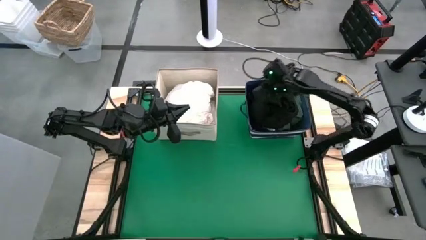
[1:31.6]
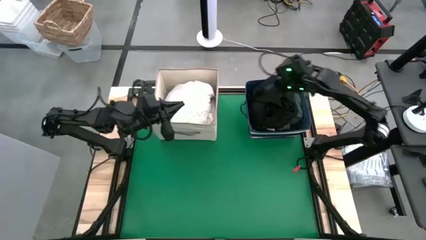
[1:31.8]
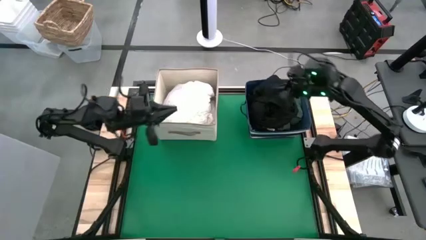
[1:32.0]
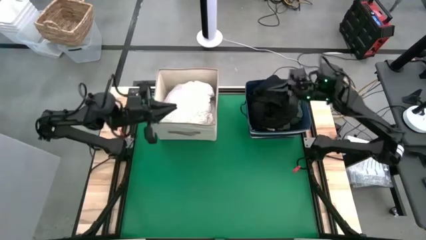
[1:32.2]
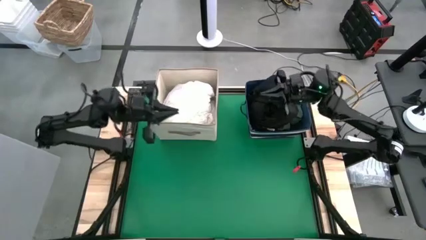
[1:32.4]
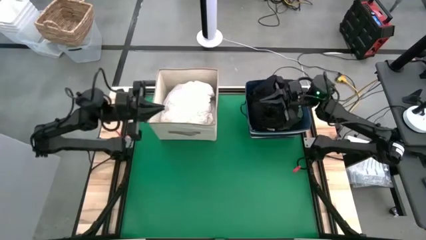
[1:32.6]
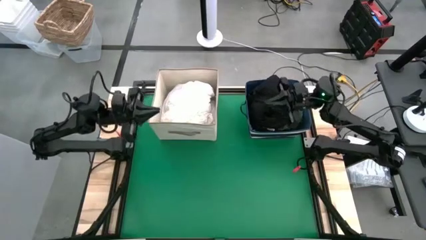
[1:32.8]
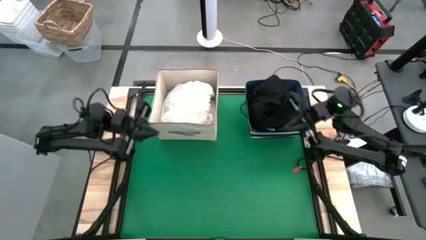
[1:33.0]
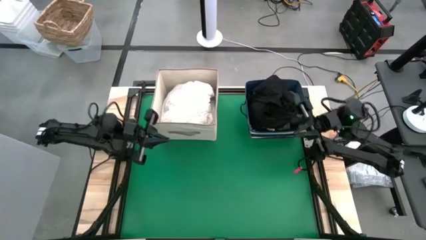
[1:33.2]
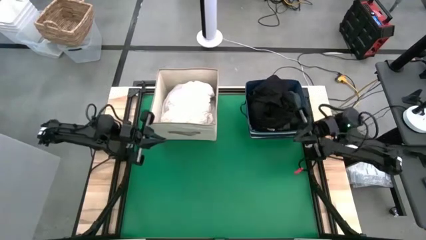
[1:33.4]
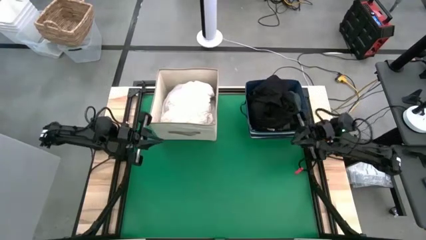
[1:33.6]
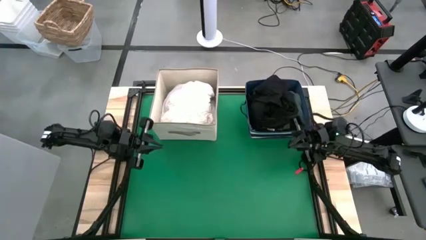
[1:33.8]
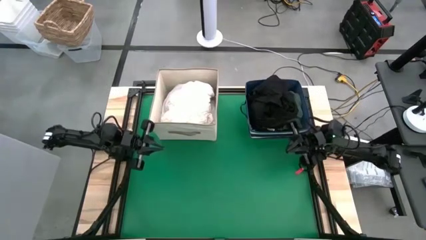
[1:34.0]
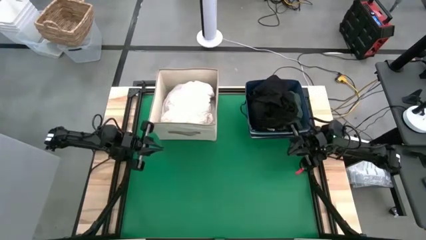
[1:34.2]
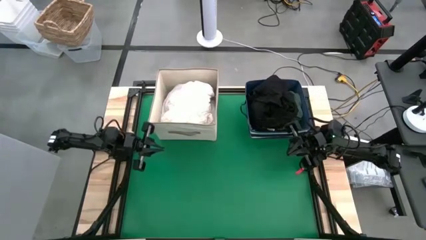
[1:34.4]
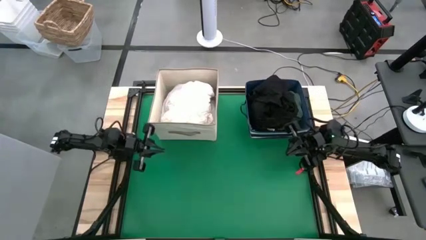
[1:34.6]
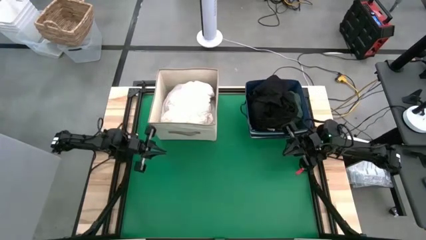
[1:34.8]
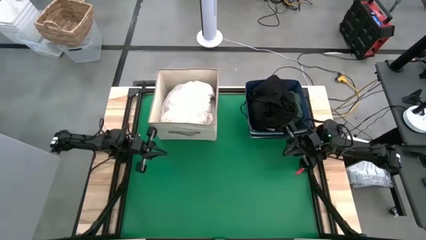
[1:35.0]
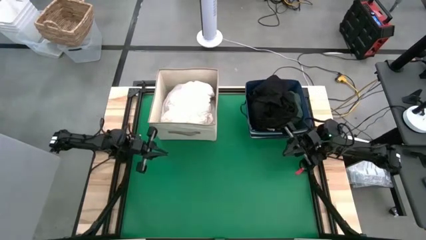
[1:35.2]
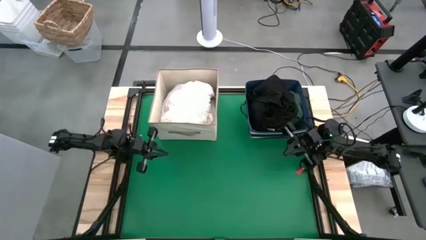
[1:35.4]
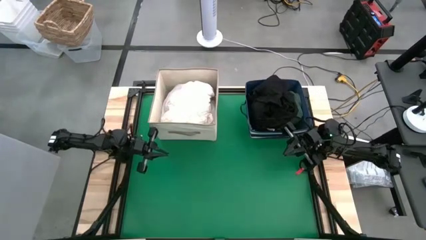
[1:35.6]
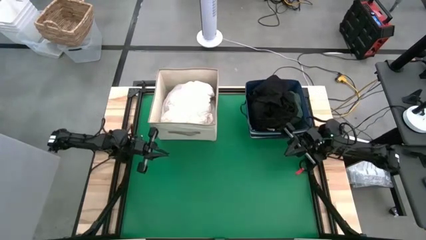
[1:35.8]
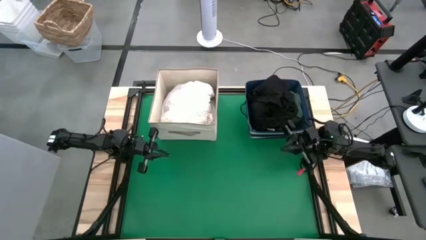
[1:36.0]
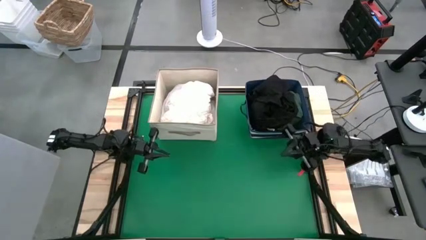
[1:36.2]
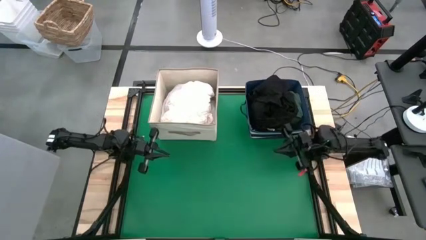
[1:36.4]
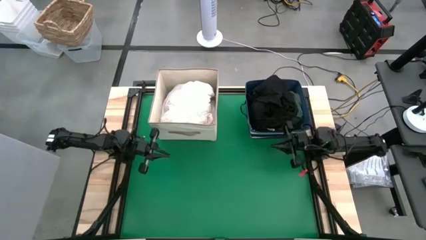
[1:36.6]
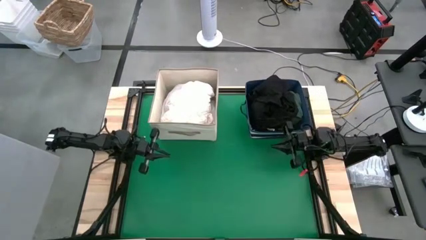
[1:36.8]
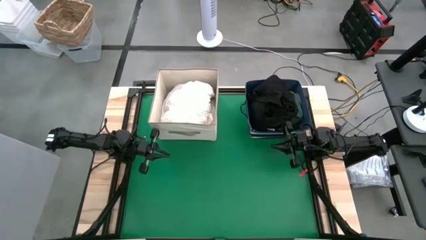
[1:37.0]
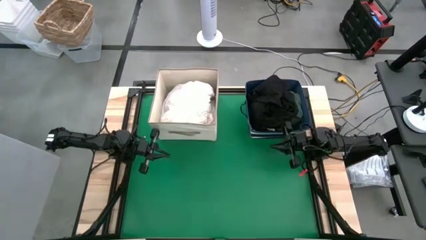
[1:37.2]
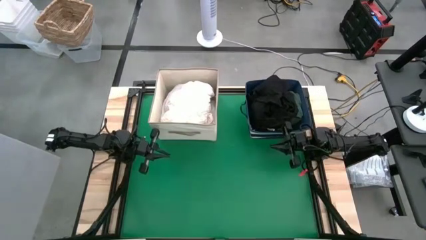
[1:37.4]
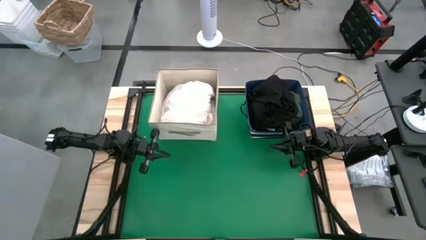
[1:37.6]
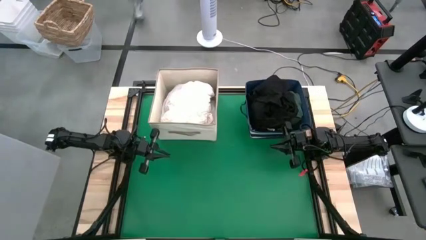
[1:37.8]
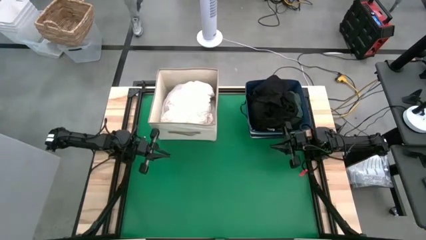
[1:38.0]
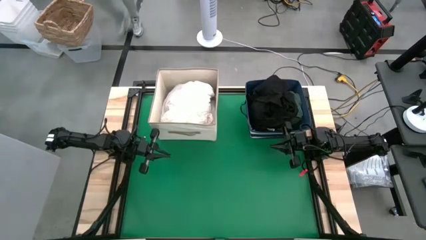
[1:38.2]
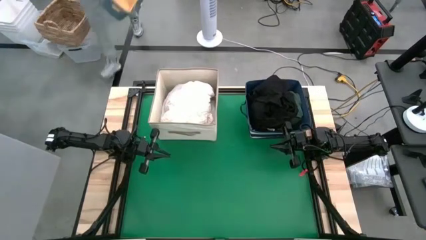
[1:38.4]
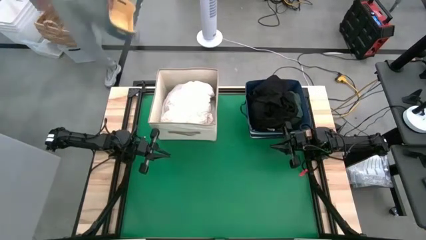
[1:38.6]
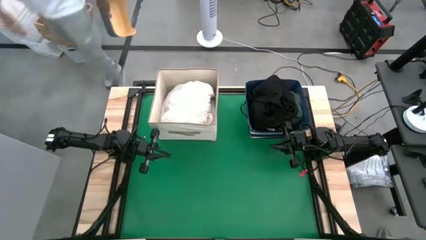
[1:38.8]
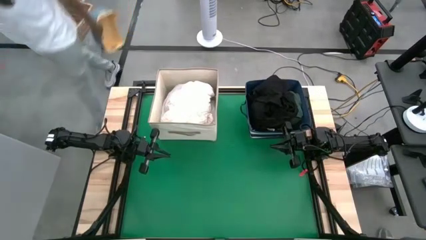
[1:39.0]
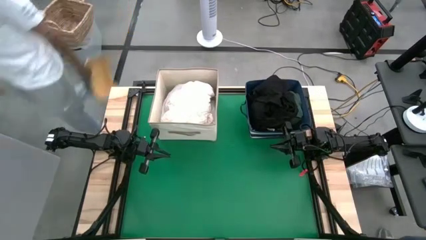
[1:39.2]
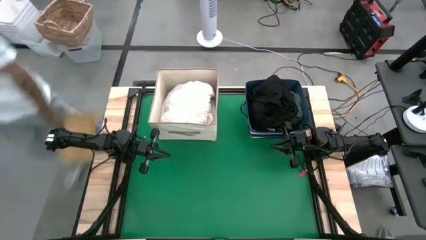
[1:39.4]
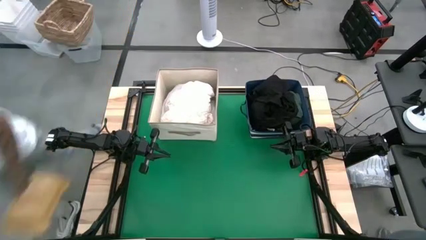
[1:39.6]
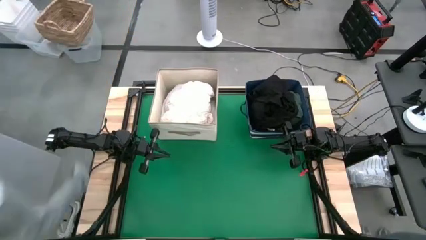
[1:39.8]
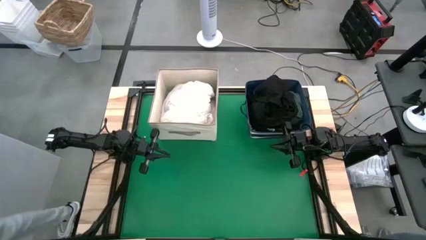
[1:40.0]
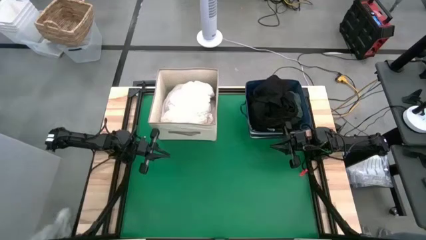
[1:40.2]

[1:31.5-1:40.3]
Return to Home Position
